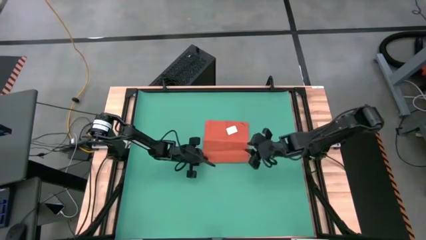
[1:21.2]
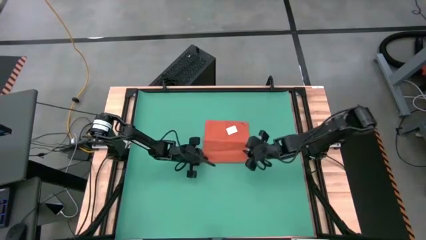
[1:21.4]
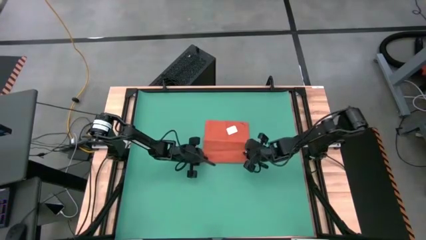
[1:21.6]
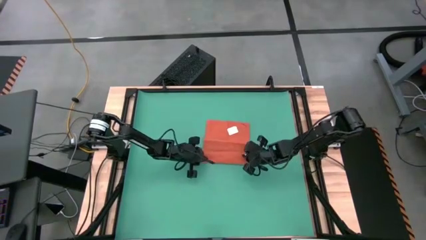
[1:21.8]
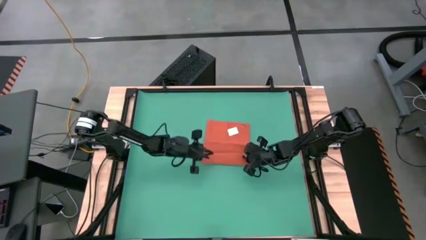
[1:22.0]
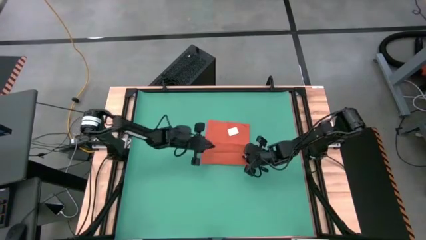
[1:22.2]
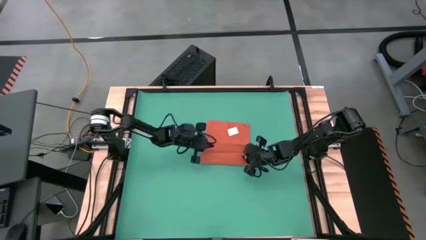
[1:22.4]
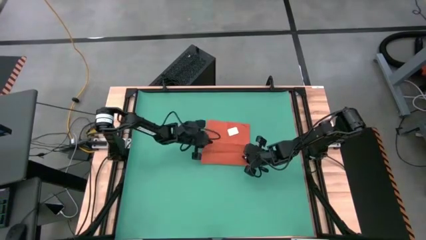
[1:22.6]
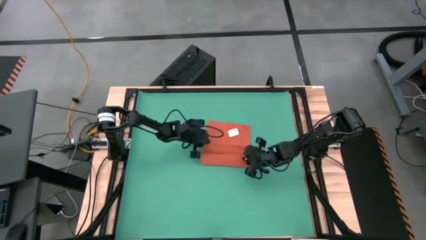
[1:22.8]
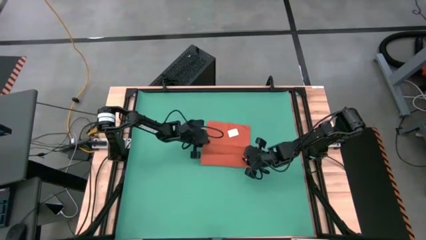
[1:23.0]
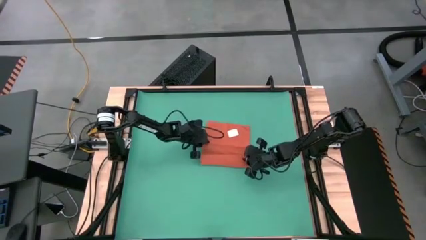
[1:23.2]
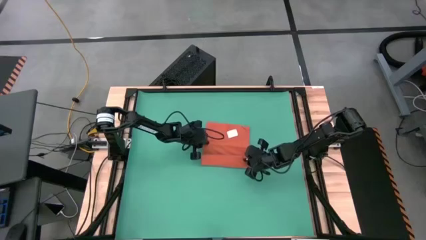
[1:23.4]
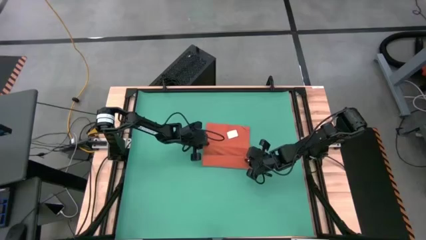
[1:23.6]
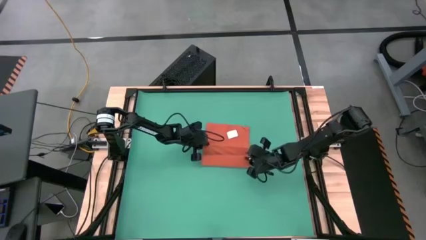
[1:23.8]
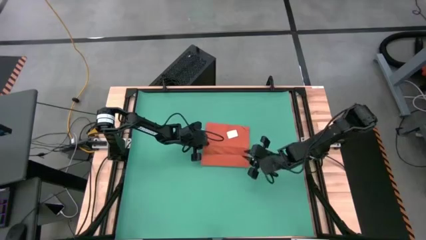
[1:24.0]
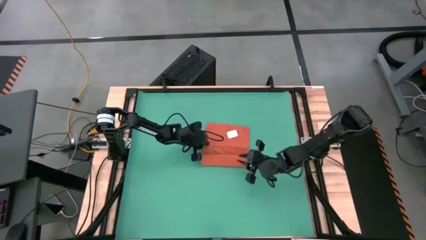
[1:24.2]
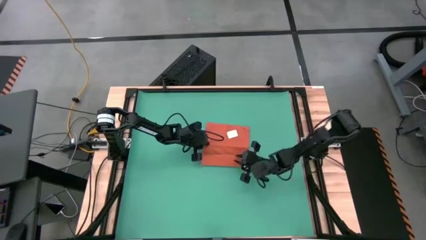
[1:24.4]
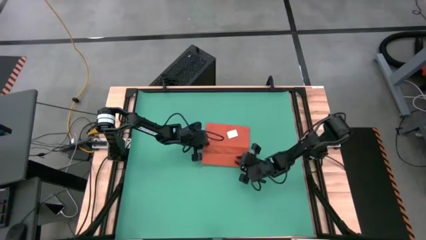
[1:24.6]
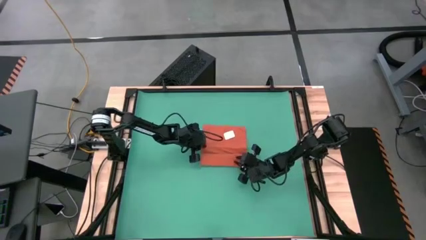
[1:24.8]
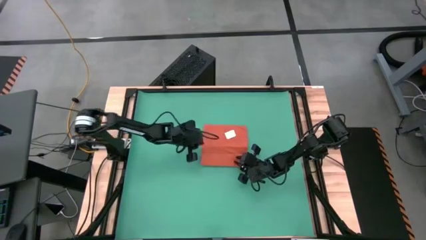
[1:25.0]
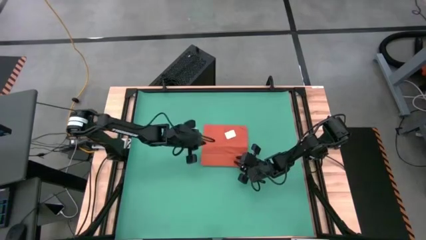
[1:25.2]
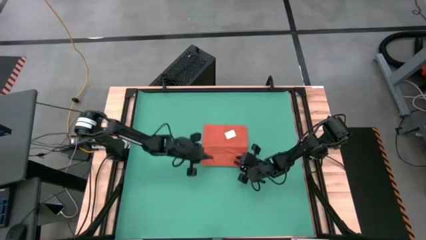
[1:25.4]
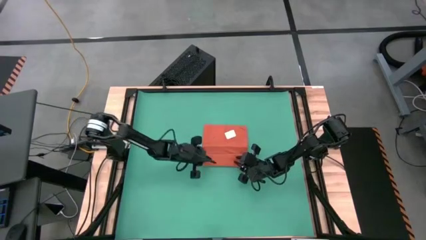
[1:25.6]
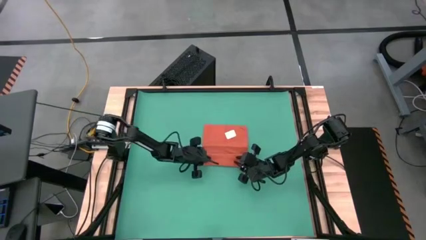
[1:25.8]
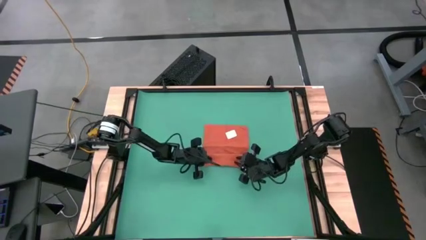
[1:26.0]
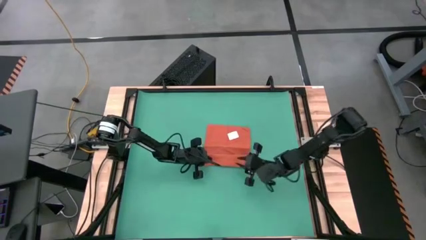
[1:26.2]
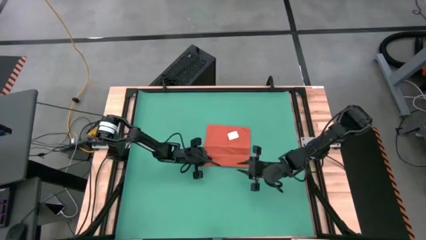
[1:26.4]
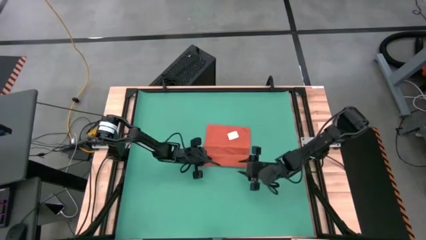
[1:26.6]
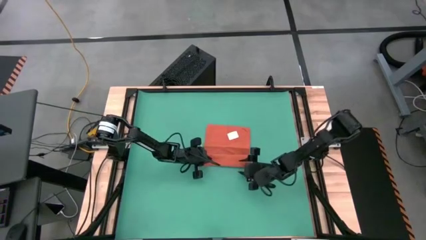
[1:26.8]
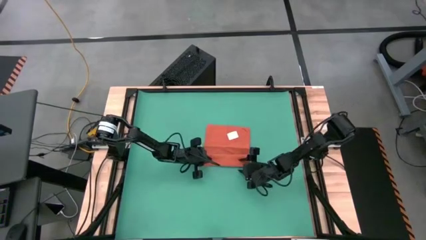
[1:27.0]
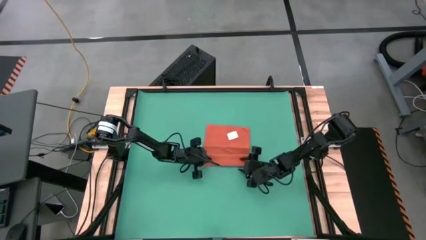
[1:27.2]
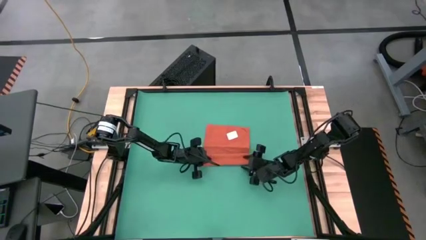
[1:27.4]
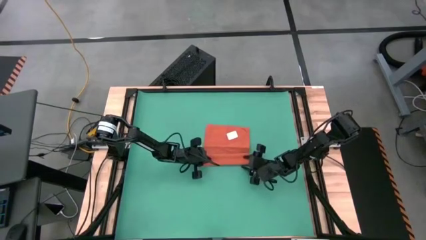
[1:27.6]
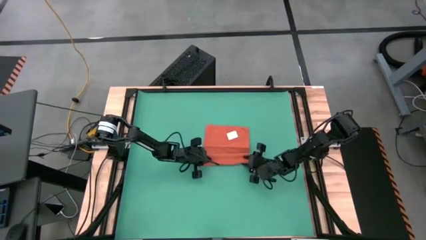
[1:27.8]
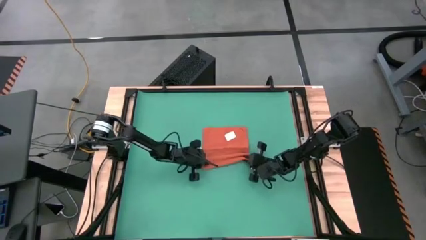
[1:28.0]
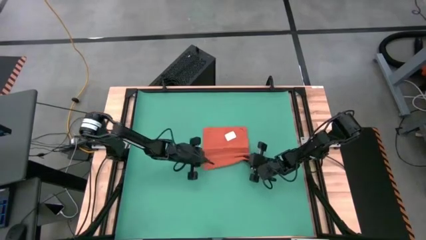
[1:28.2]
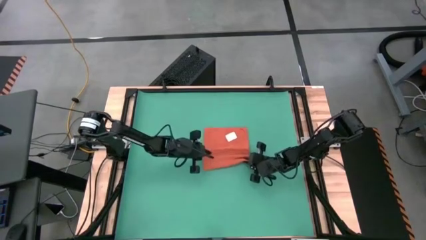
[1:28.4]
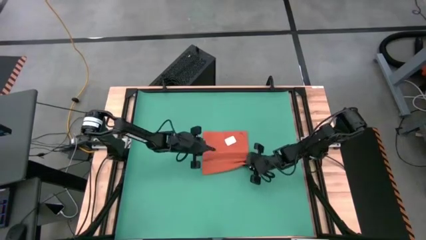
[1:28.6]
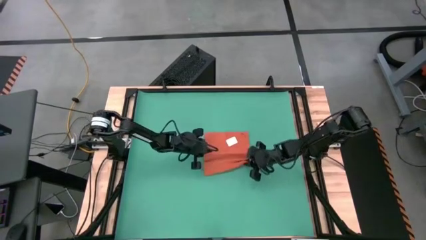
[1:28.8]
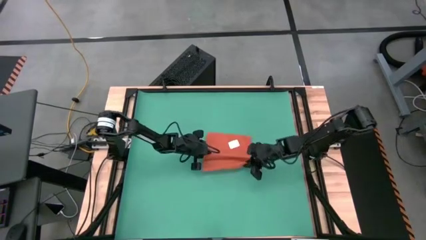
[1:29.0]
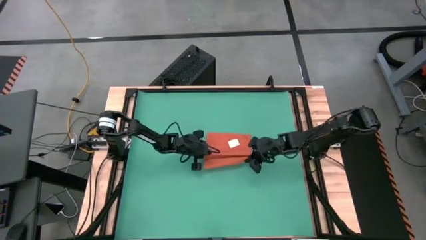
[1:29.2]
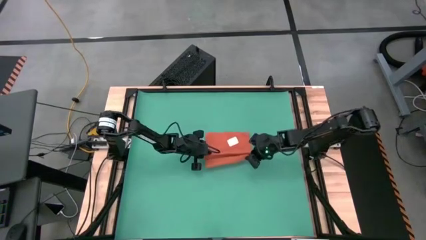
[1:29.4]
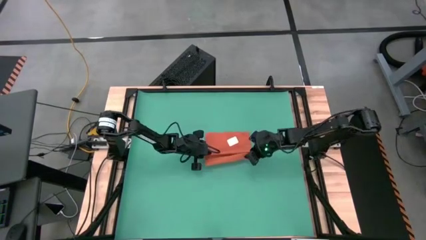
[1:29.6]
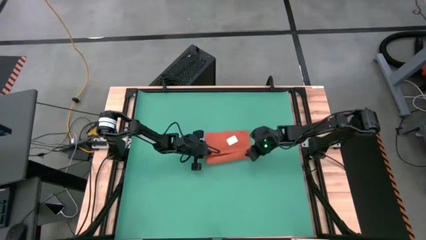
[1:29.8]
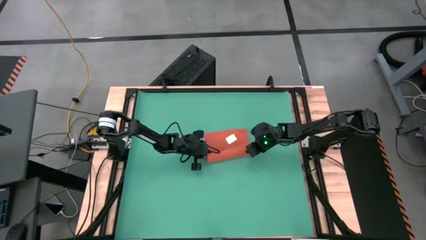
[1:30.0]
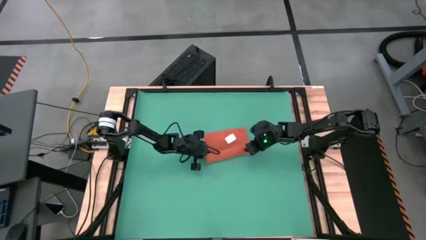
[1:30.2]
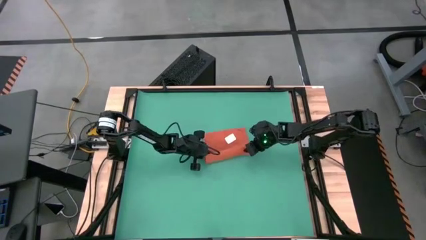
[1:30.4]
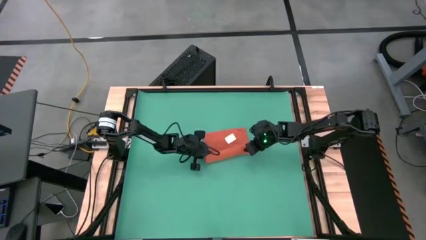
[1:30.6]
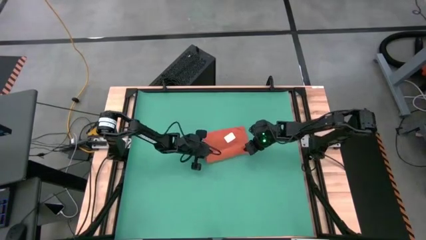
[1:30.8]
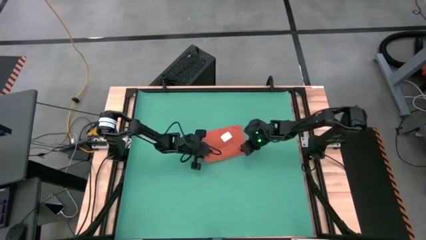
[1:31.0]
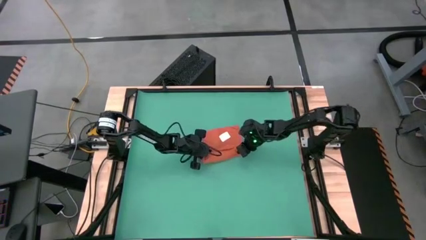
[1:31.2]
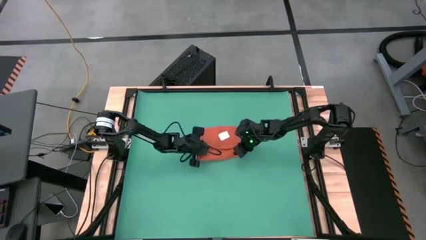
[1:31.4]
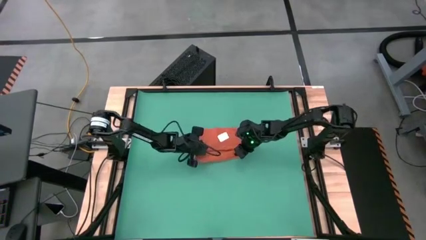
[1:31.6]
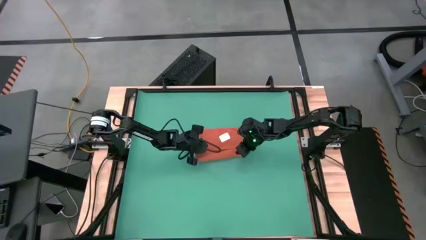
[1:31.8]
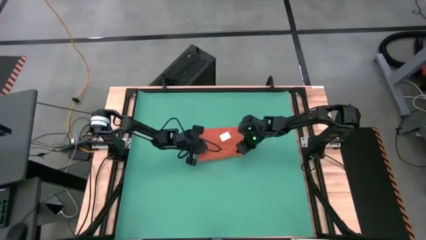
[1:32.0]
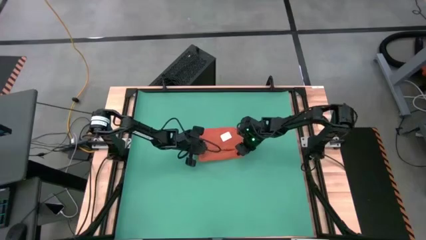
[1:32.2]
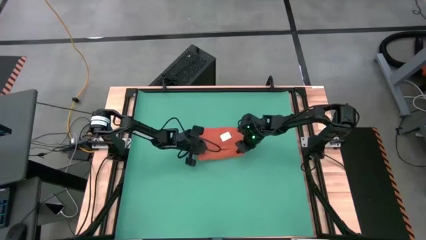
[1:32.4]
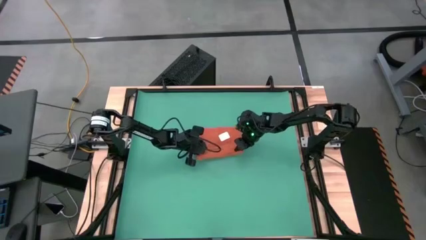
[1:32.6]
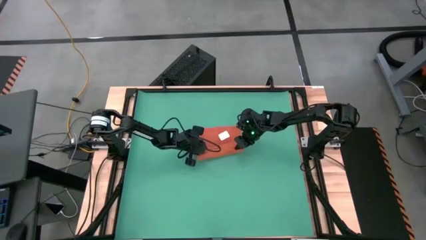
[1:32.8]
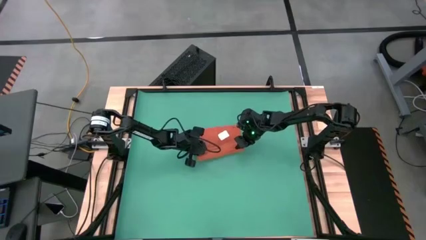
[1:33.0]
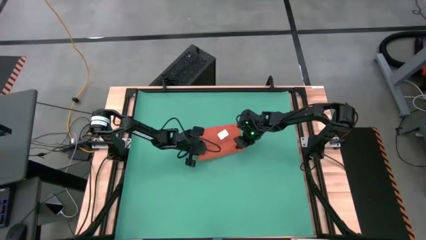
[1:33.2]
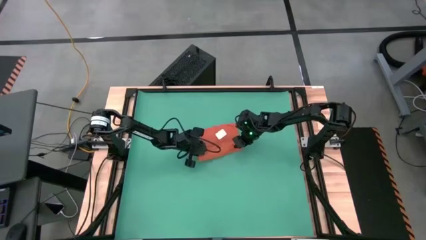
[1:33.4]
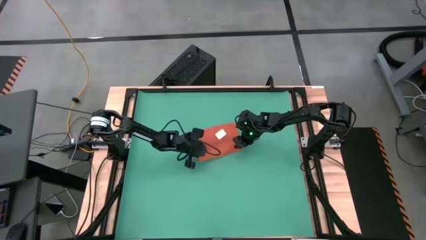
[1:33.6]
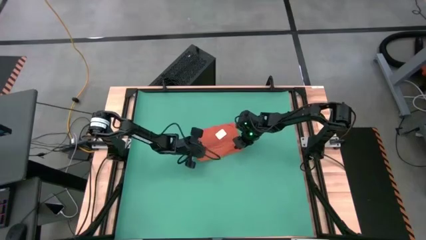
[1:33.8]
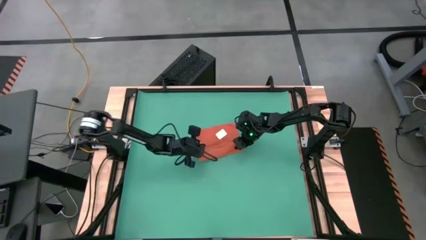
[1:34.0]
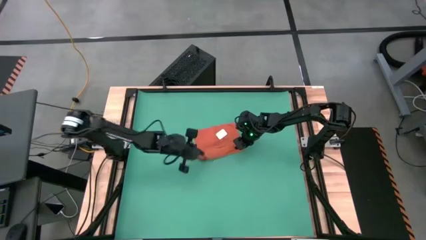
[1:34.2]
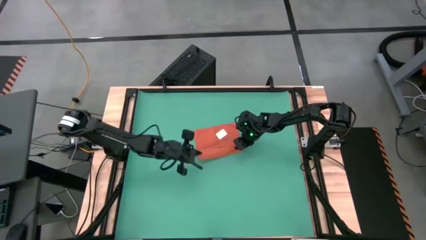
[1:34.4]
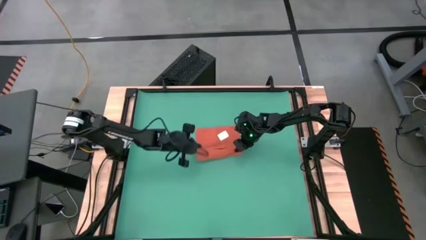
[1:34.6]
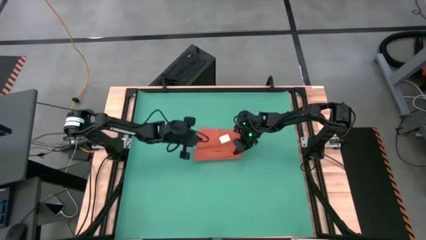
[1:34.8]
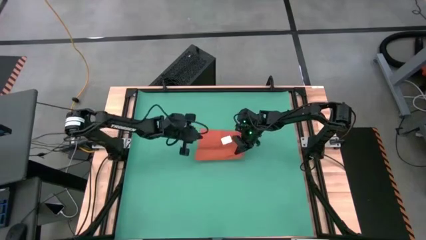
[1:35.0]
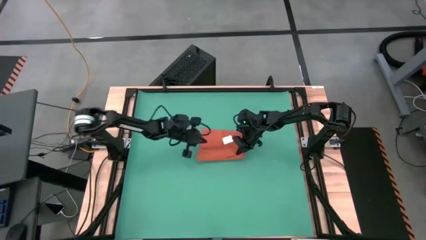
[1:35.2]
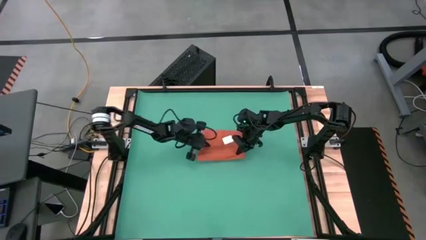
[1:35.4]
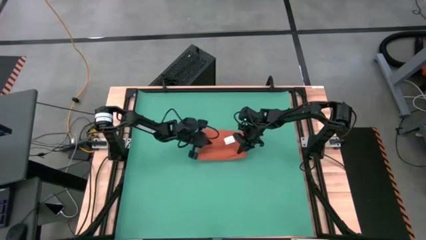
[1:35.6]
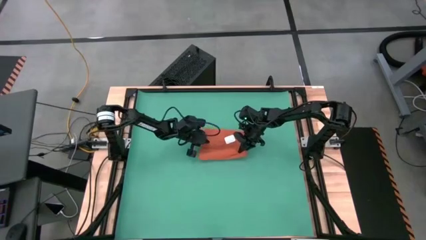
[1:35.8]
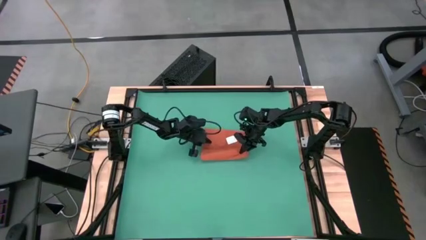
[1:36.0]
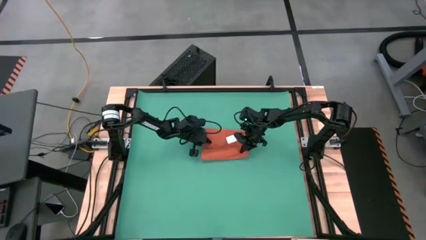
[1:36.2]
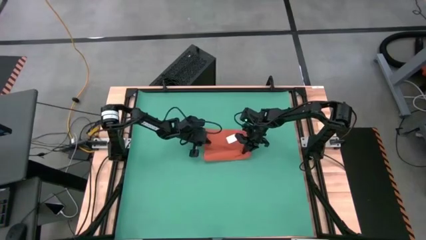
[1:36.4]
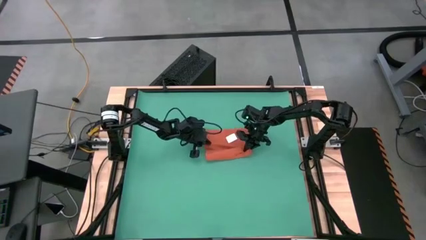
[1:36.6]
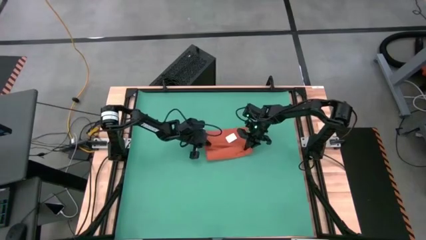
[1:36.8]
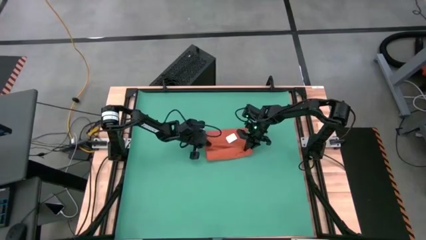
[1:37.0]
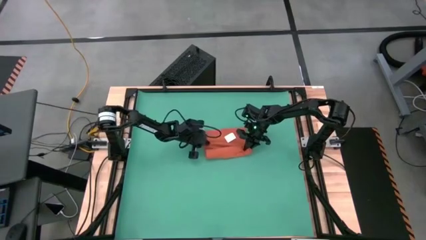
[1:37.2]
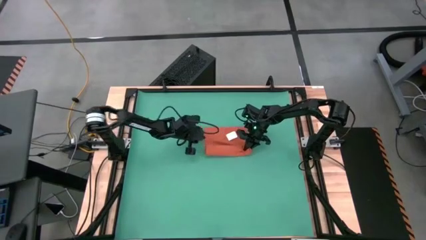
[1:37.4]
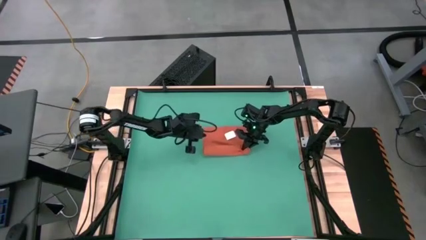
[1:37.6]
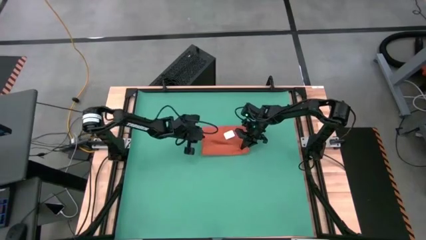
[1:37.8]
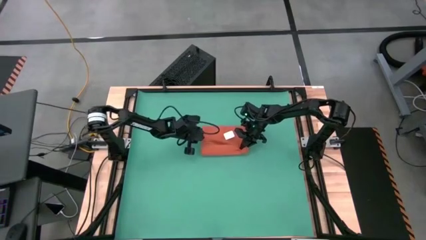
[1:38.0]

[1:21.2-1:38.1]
Task: Roll towel
Roll the orange microfiber towel
